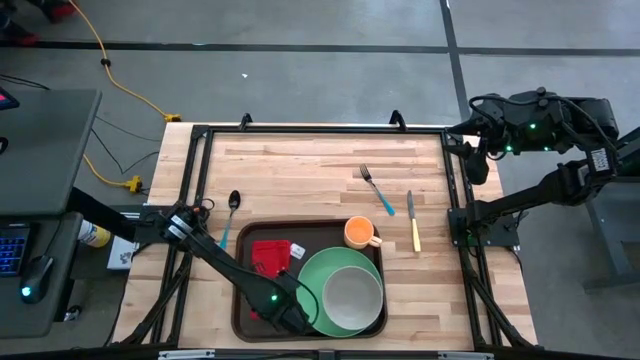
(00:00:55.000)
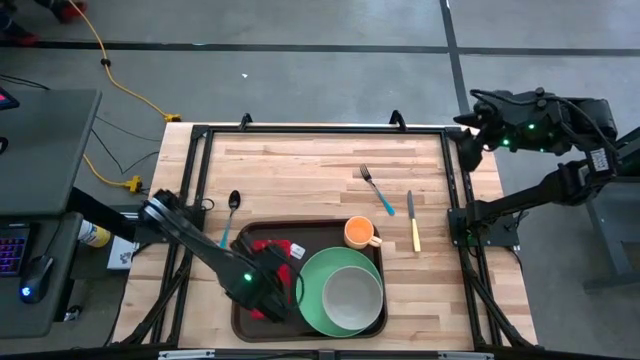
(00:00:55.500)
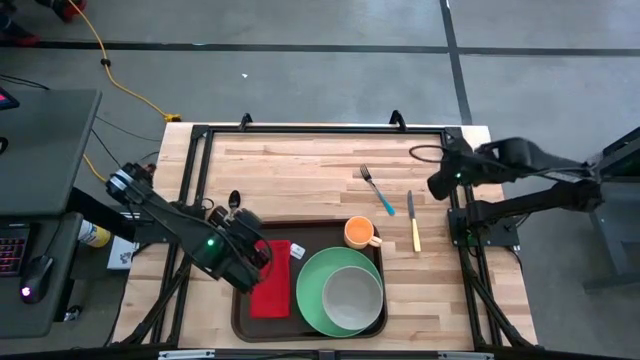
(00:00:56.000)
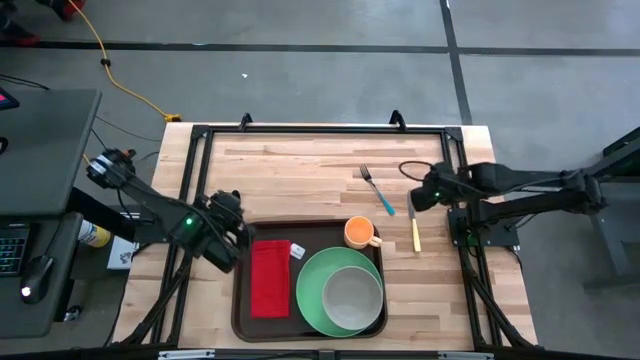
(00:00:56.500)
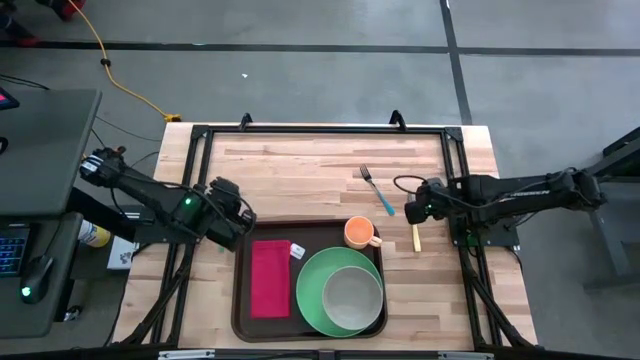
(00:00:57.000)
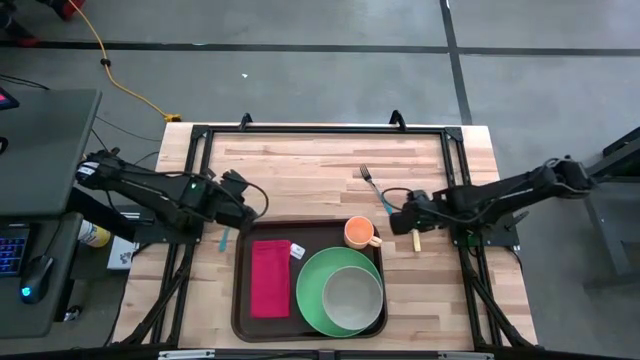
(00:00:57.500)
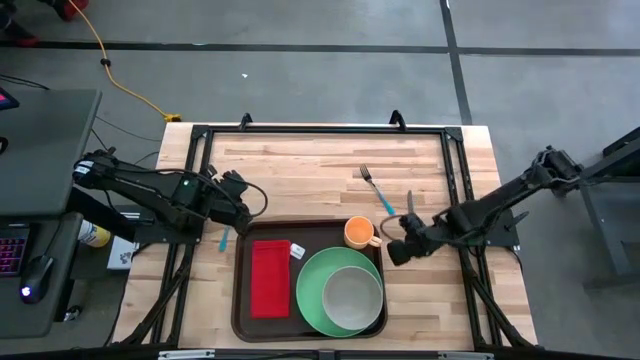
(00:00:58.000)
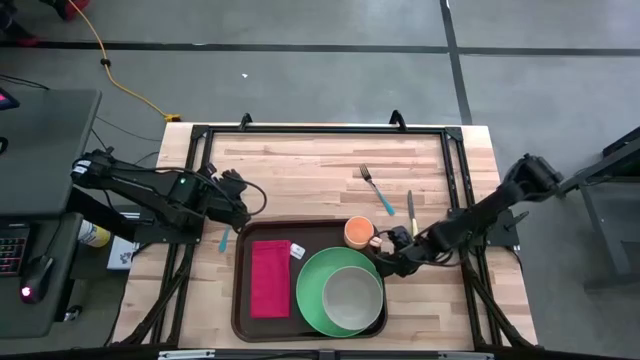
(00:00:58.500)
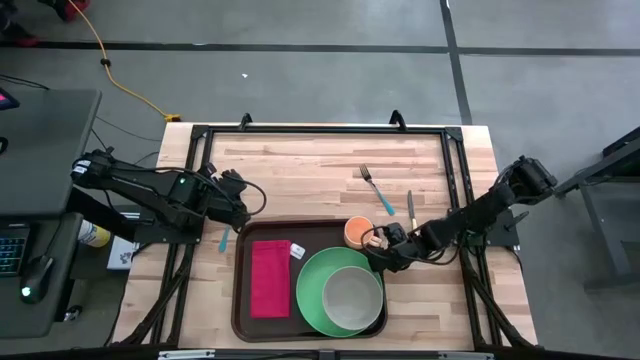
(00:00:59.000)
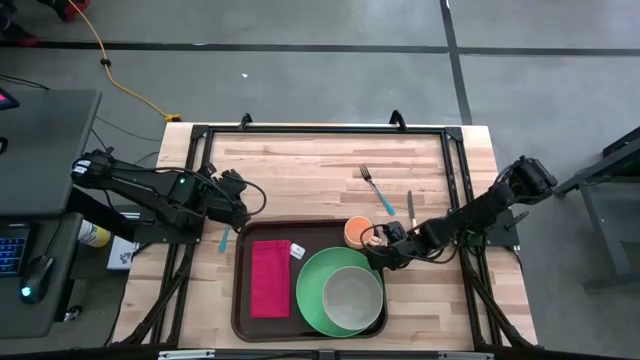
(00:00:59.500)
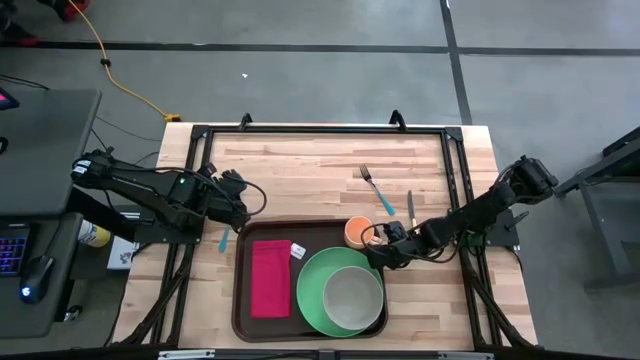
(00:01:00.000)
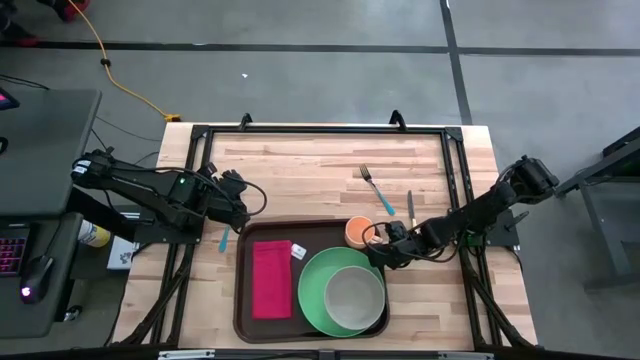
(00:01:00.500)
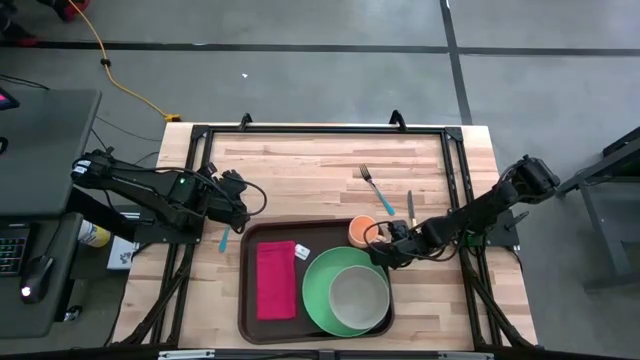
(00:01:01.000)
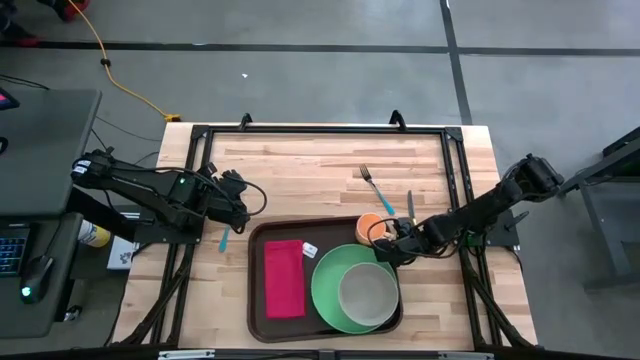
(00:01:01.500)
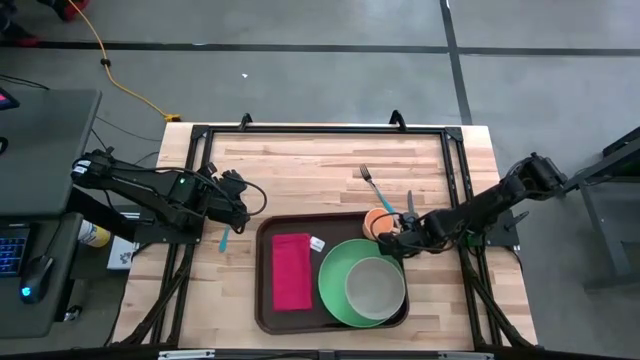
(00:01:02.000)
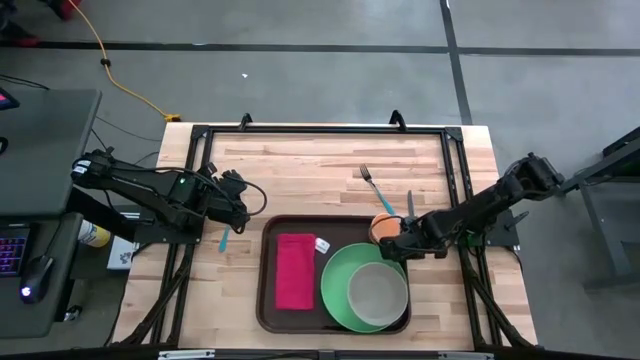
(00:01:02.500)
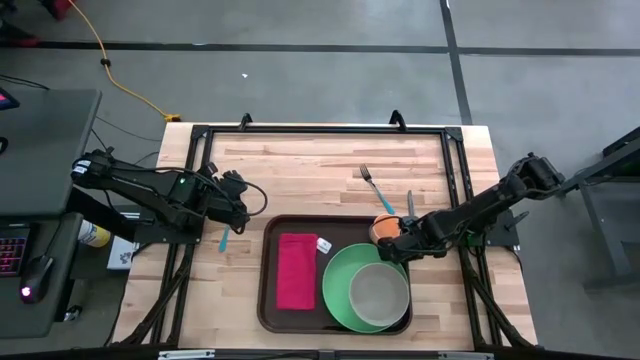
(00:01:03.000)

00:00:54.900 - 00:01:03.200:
Task: Set up tray
Adjust the brown serving tray on the table

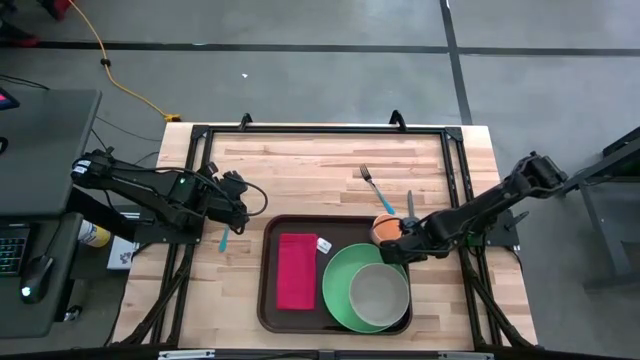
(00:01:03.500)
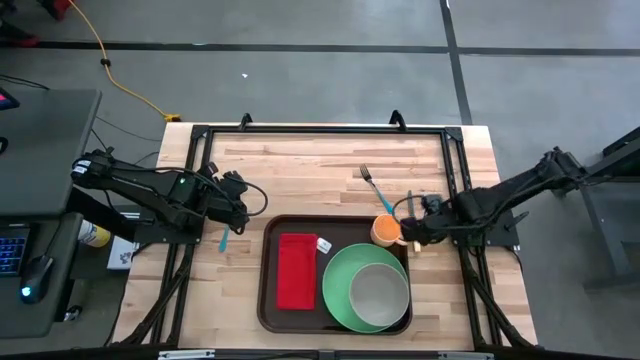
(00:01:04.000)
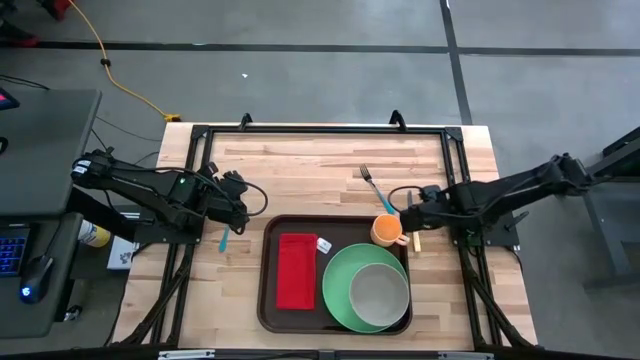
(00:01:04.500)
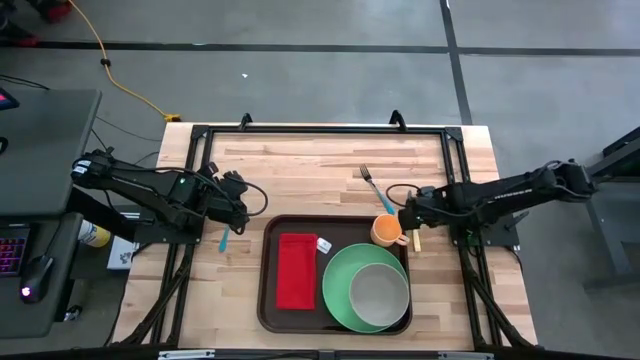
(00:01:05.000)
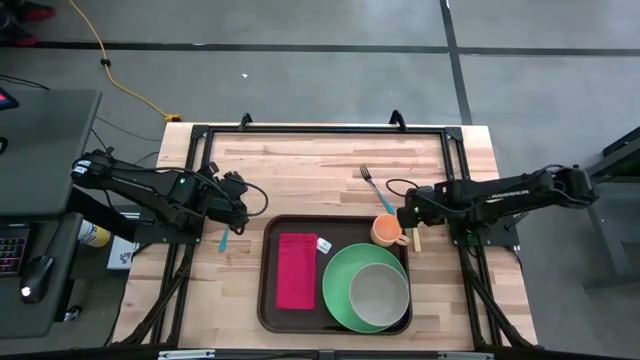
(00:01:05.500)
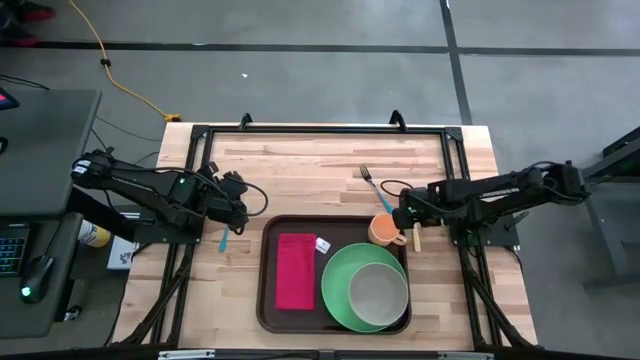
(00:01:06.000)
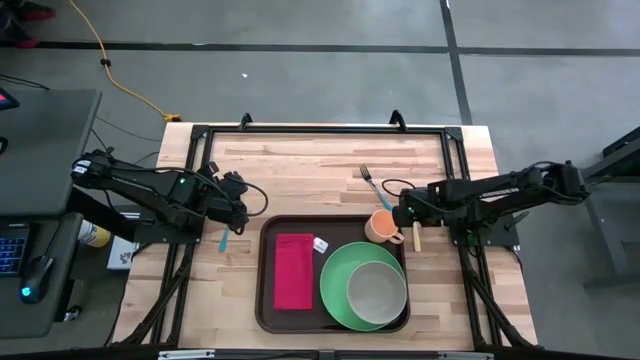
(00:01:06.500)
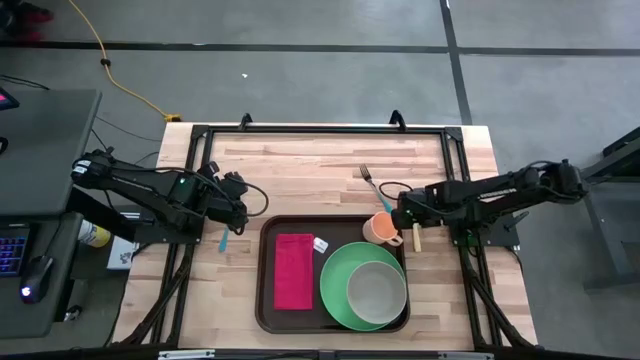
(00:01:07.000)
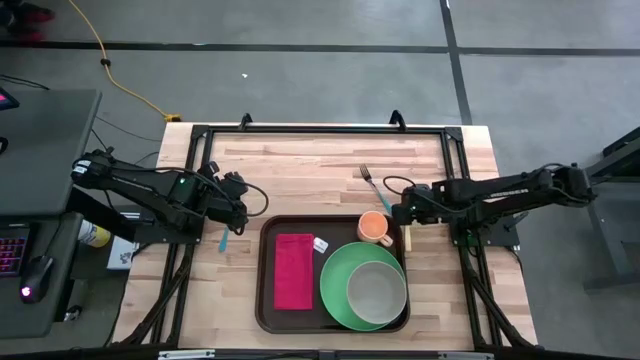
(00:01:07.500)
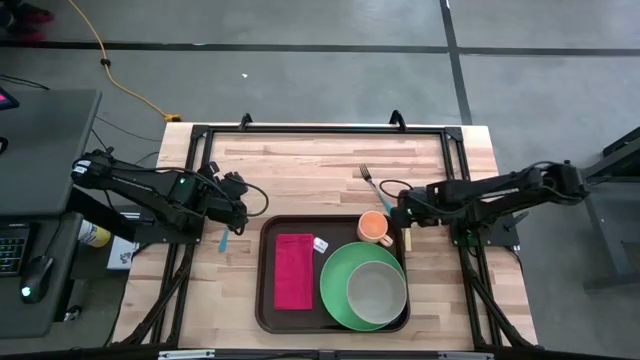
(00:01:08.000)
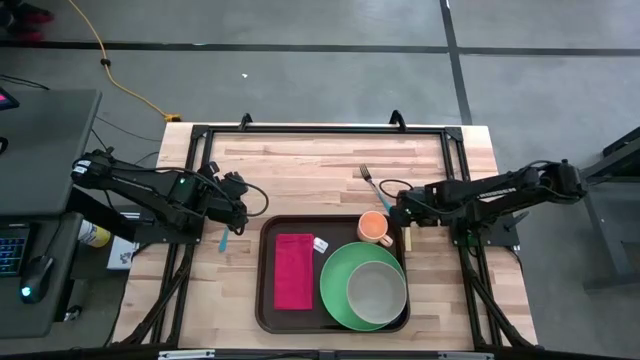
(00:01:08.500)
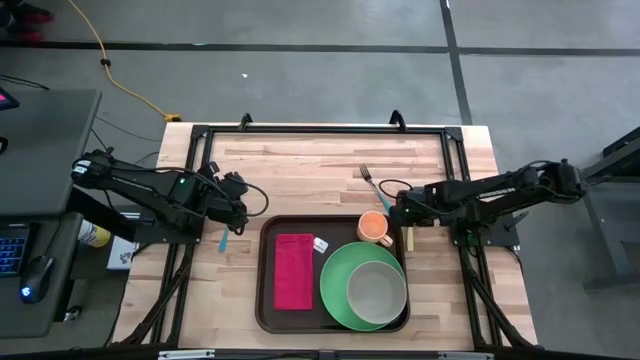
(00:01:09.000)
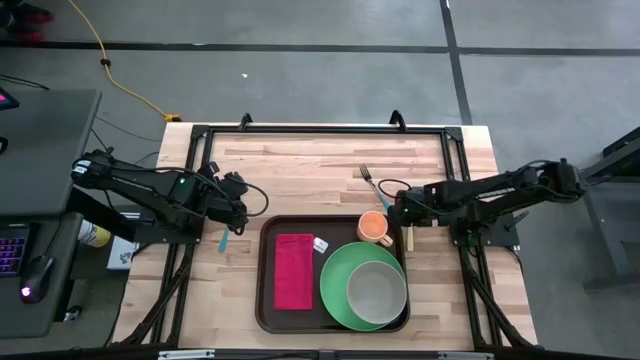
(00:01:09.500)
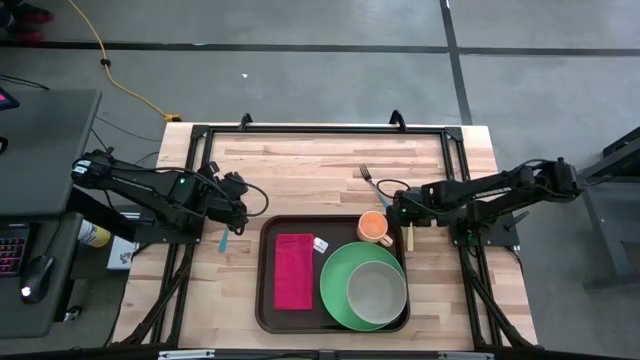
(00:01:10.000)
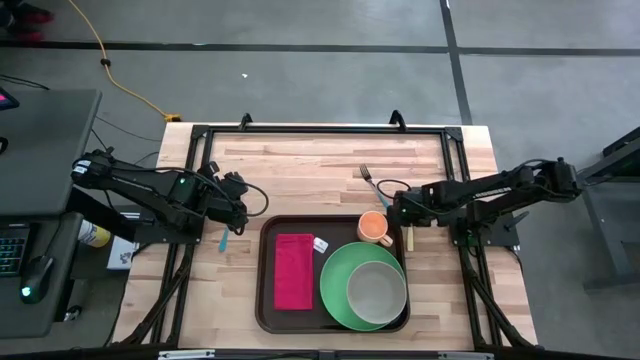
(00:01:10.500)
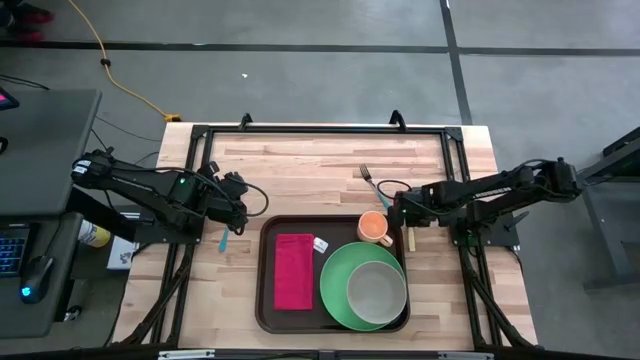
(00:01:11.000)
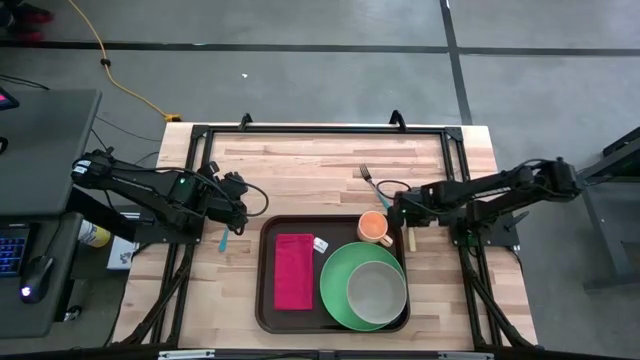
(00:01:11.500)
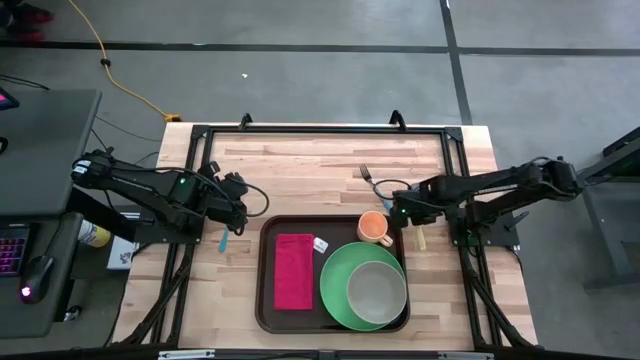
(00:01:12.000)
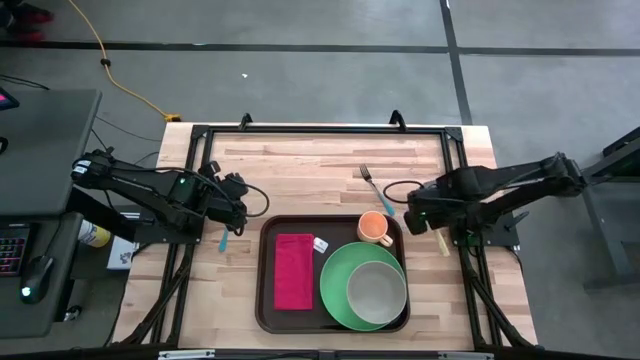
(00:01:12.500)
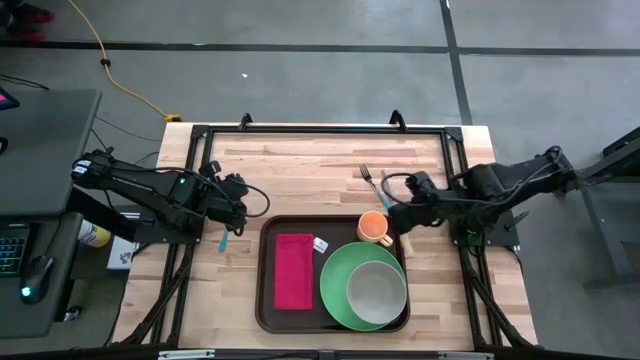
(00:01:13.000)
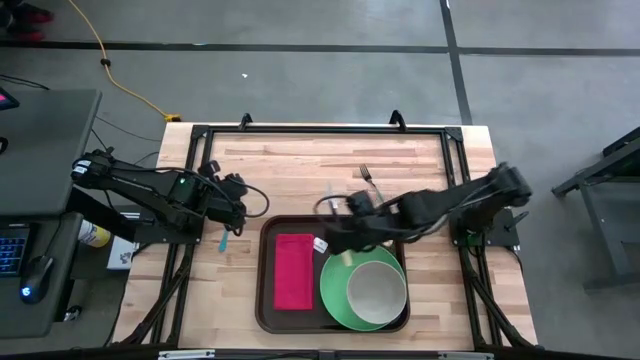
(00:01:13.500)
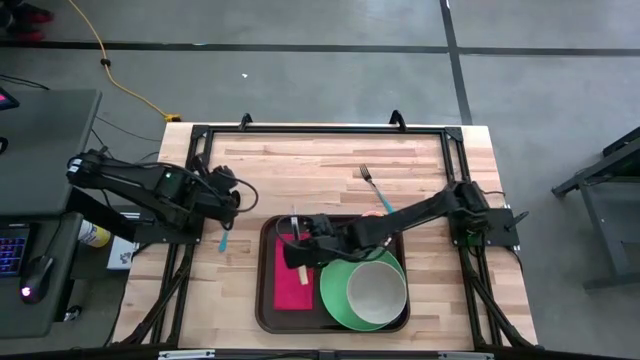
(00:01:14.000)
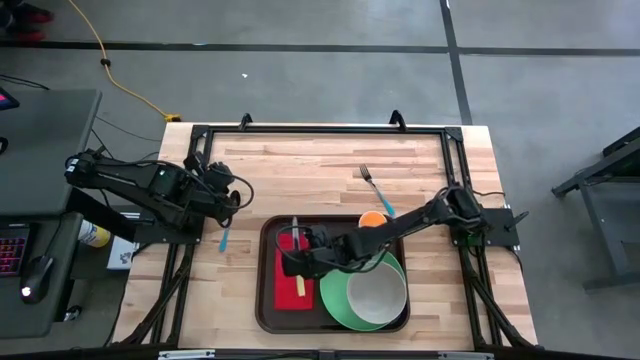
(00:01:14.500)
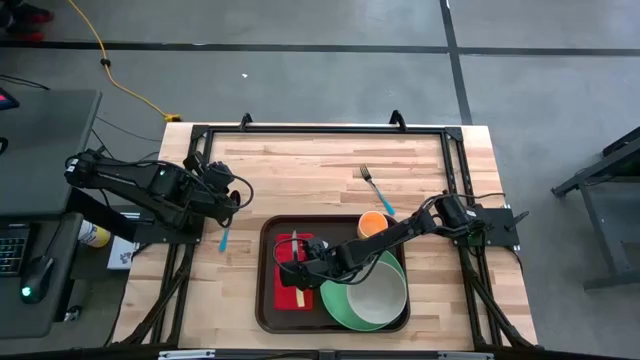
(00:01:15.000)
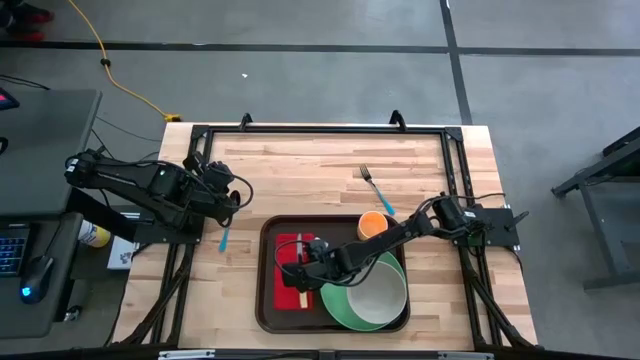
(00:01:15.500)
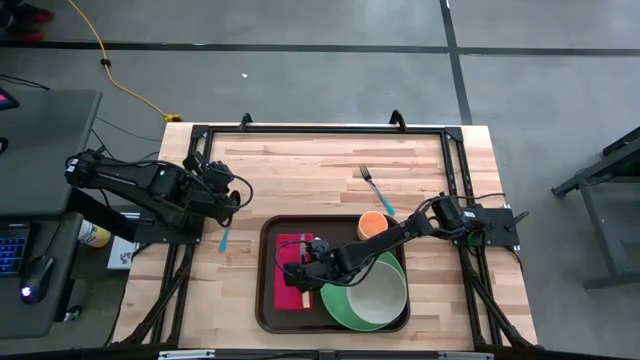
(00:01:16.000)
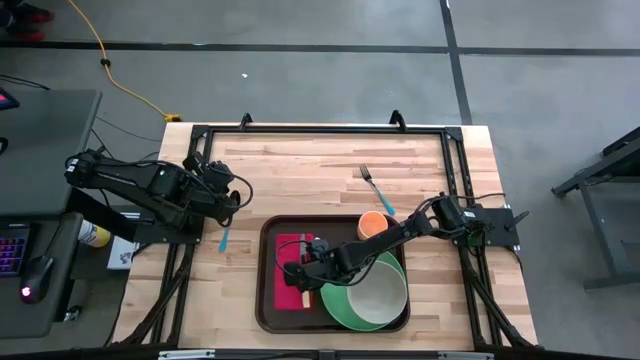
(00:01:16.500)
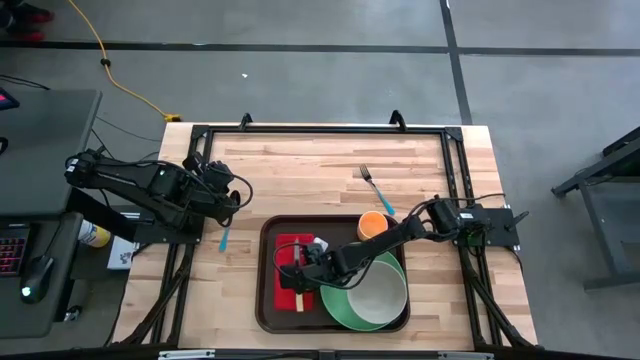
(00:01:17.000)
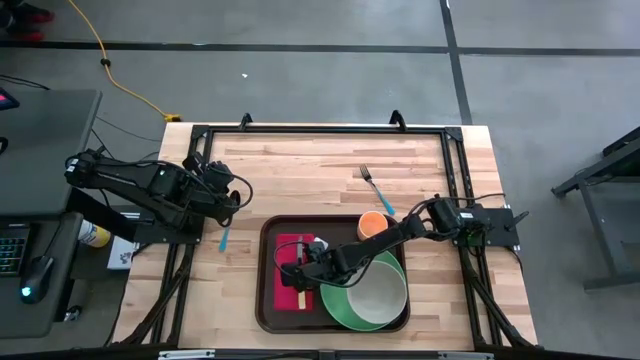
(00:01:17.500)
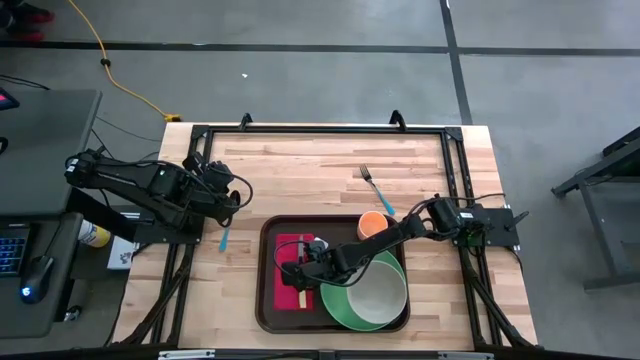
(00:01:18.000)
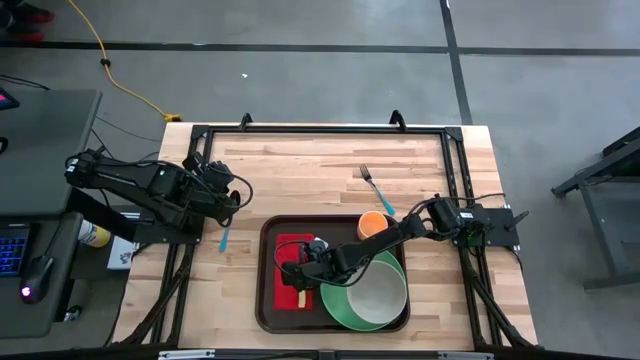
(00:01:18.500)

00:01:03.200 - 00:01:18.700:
Put the yellow table knife on the red table napkin to the left of the green plate
